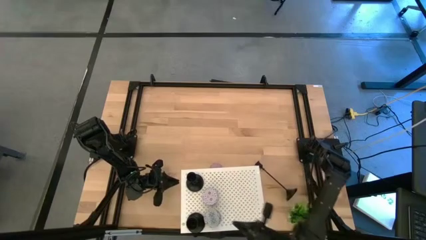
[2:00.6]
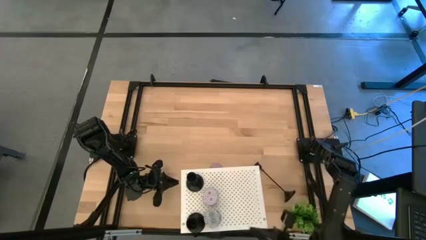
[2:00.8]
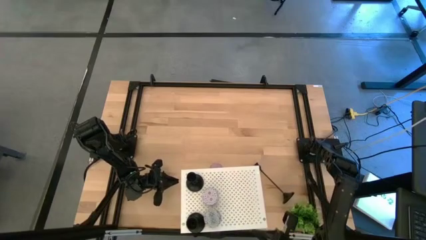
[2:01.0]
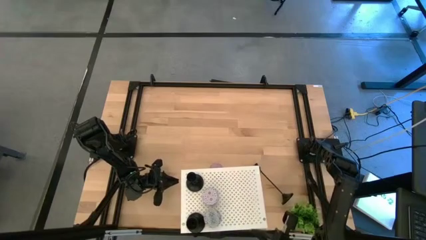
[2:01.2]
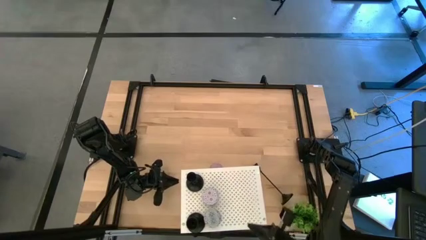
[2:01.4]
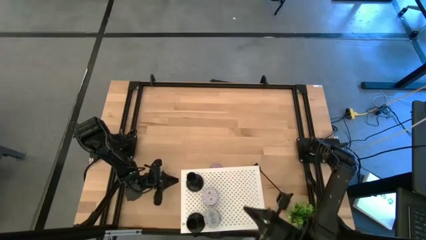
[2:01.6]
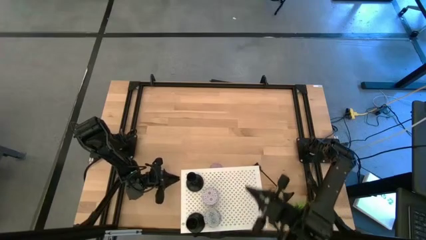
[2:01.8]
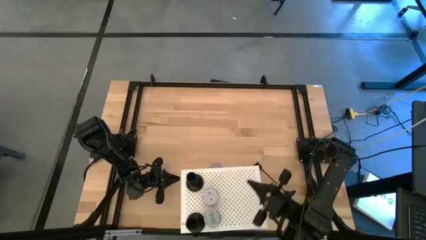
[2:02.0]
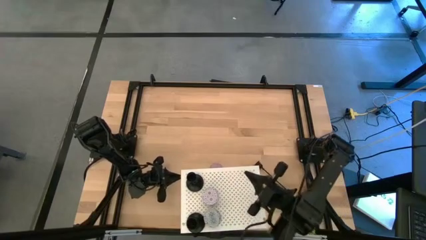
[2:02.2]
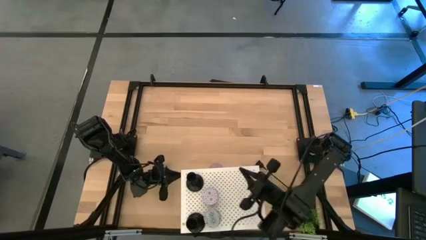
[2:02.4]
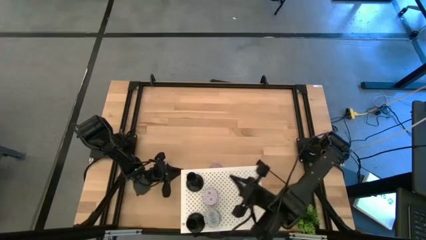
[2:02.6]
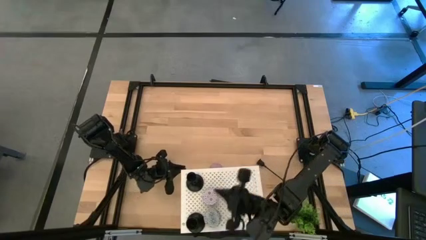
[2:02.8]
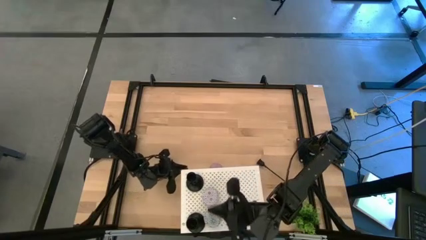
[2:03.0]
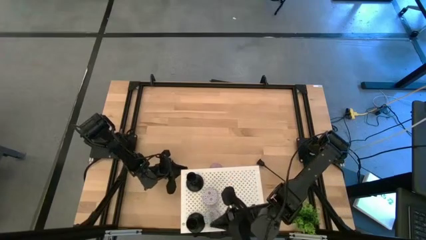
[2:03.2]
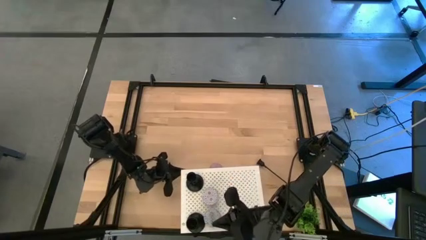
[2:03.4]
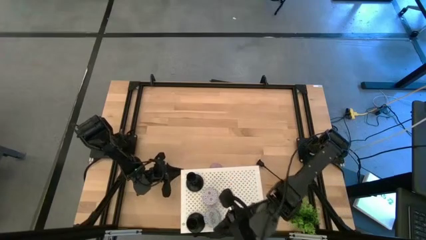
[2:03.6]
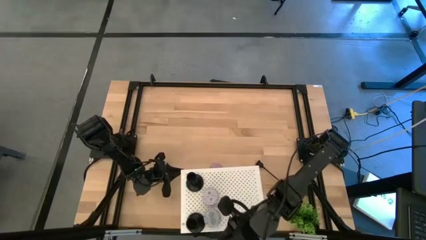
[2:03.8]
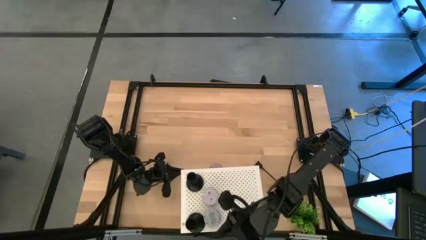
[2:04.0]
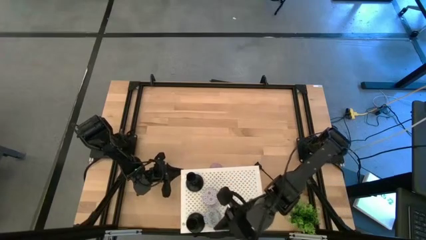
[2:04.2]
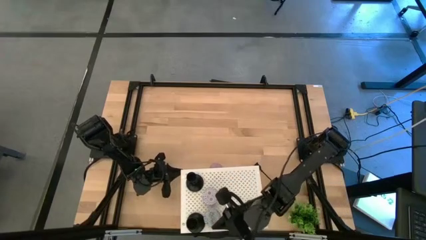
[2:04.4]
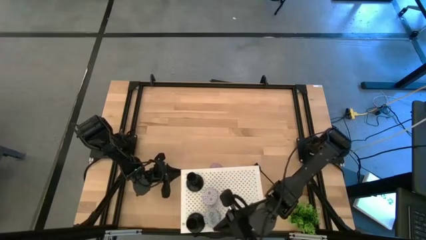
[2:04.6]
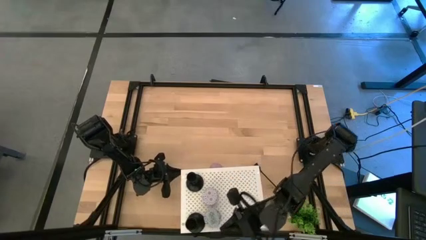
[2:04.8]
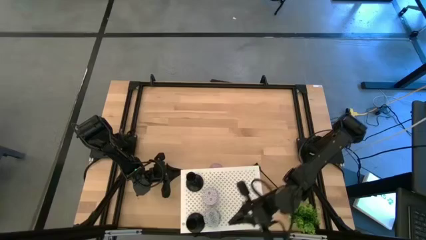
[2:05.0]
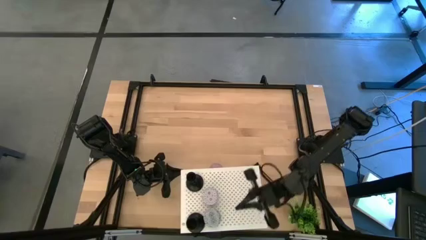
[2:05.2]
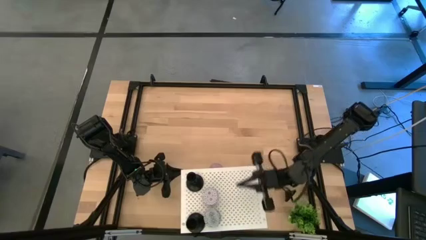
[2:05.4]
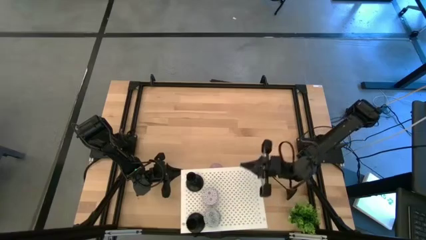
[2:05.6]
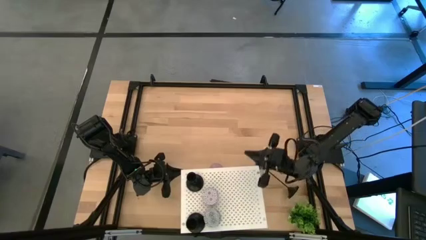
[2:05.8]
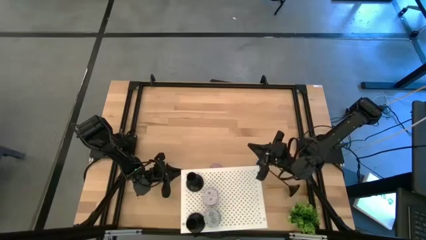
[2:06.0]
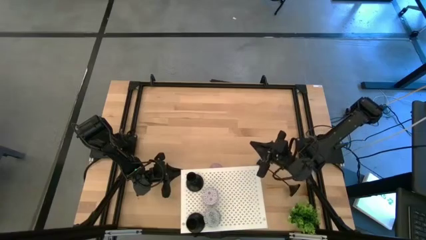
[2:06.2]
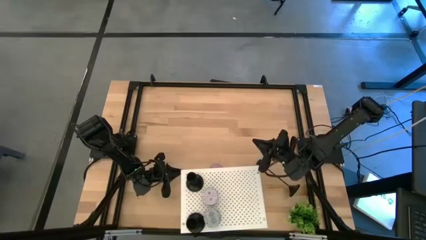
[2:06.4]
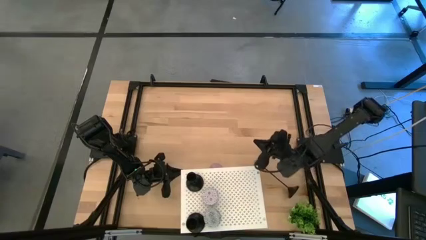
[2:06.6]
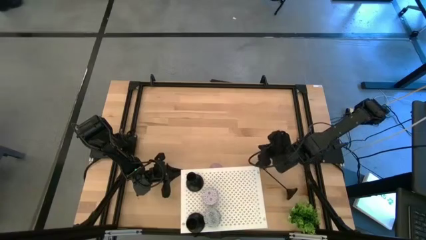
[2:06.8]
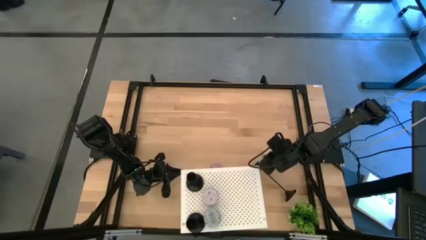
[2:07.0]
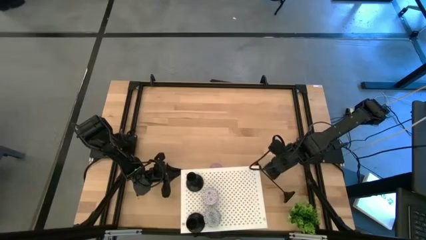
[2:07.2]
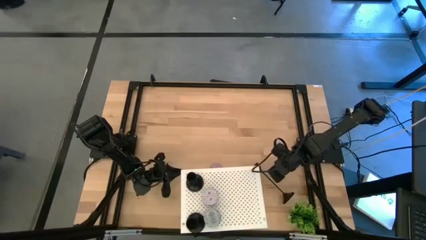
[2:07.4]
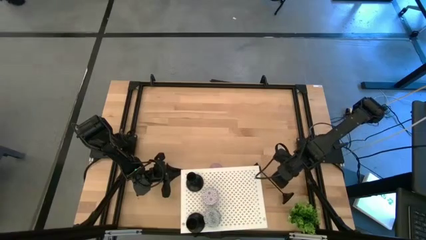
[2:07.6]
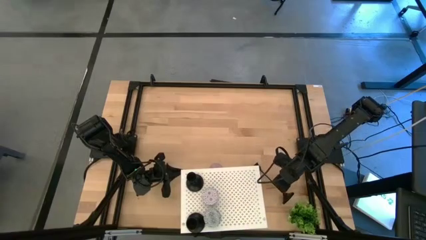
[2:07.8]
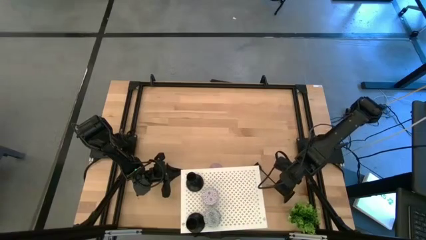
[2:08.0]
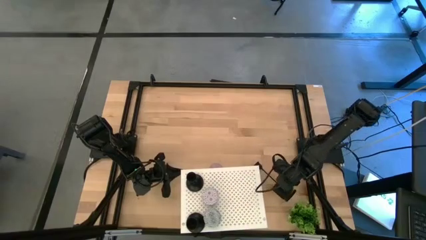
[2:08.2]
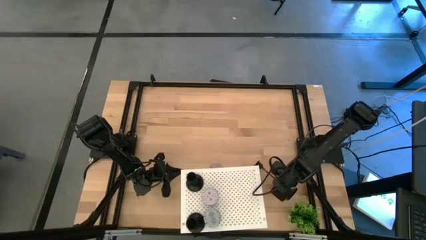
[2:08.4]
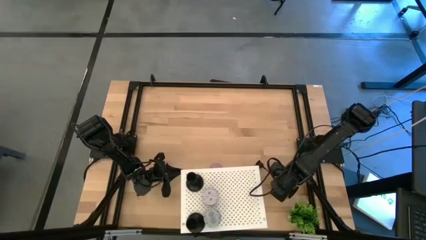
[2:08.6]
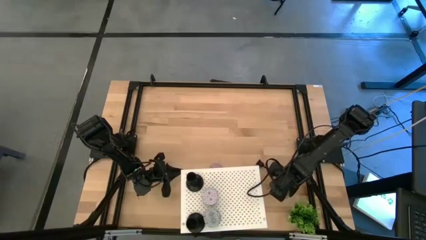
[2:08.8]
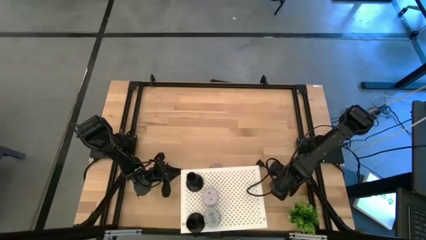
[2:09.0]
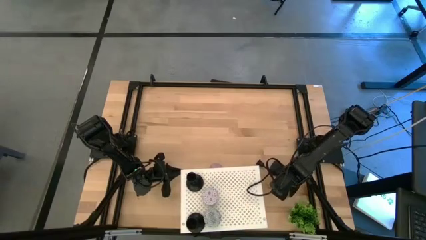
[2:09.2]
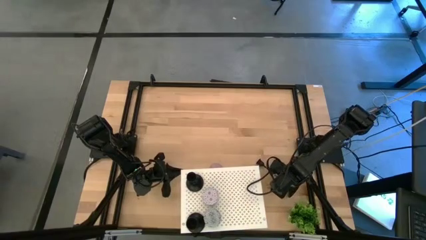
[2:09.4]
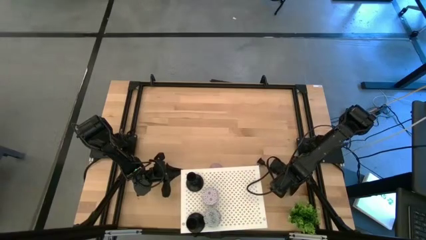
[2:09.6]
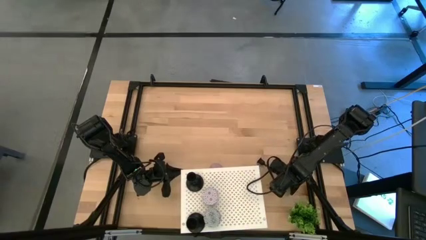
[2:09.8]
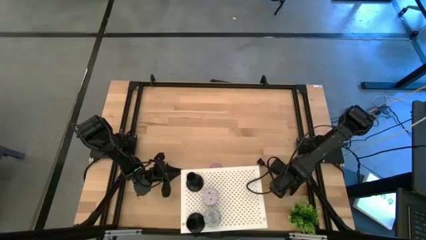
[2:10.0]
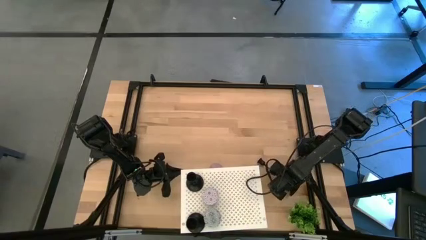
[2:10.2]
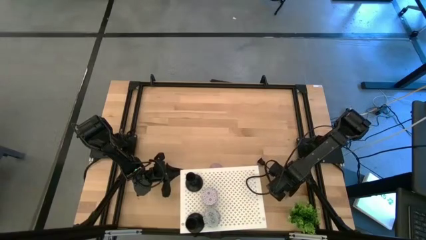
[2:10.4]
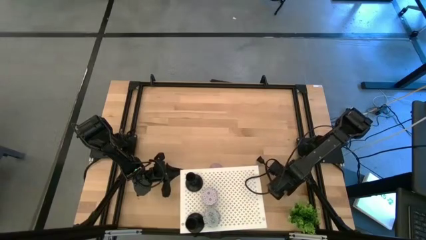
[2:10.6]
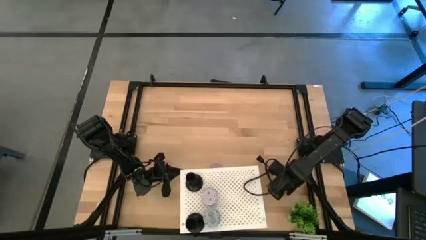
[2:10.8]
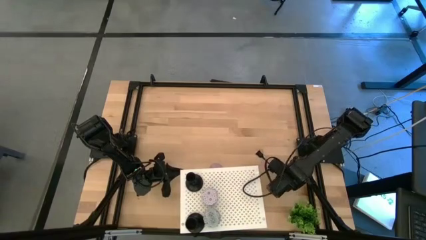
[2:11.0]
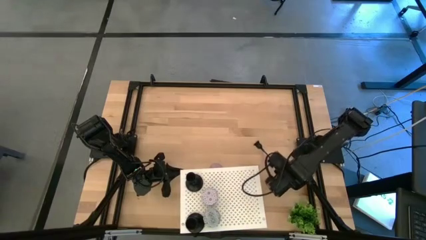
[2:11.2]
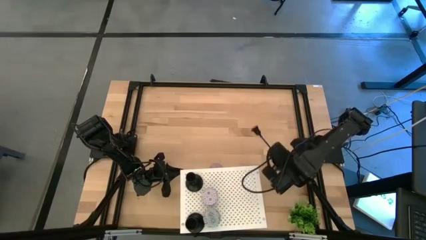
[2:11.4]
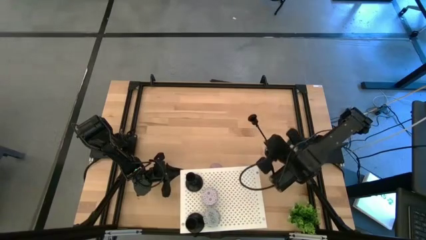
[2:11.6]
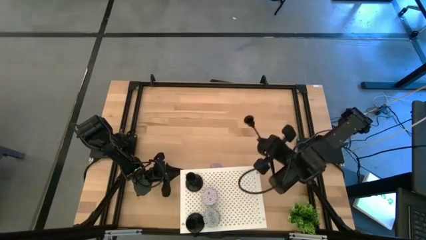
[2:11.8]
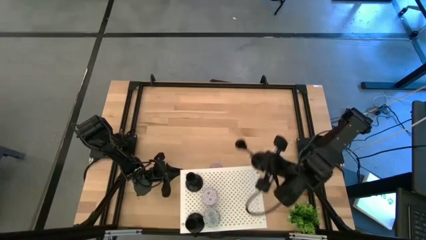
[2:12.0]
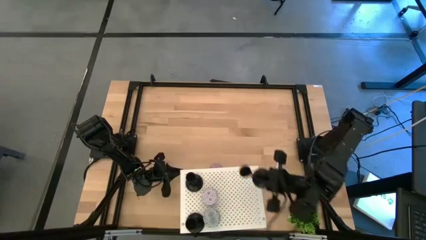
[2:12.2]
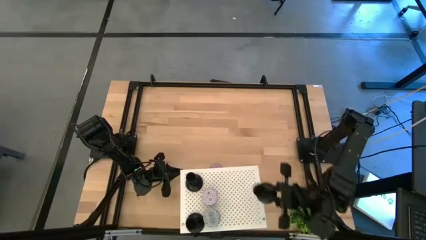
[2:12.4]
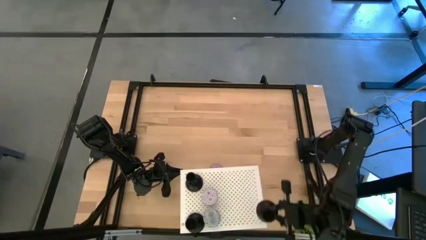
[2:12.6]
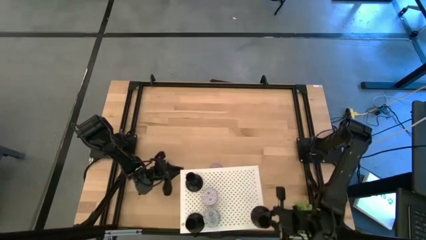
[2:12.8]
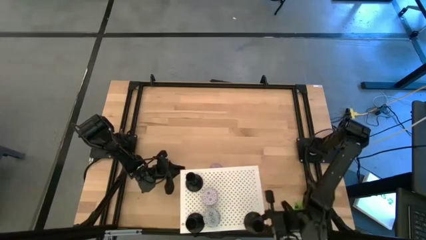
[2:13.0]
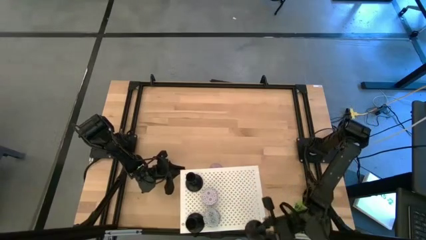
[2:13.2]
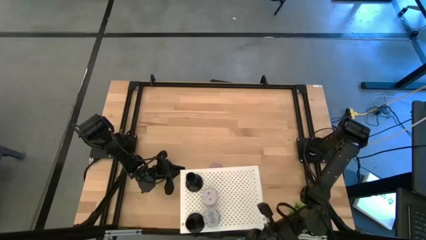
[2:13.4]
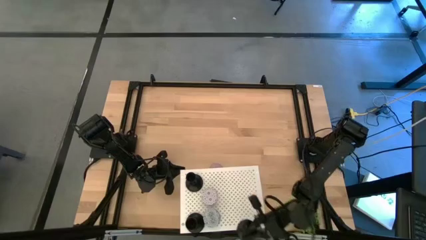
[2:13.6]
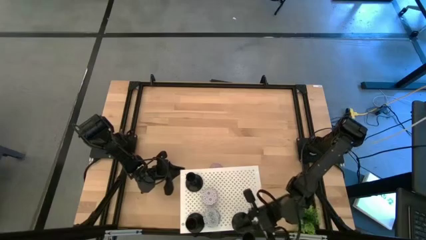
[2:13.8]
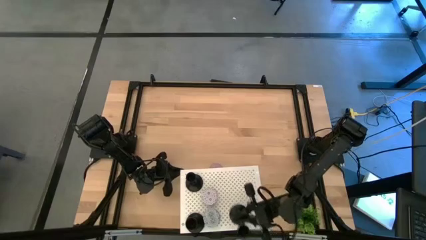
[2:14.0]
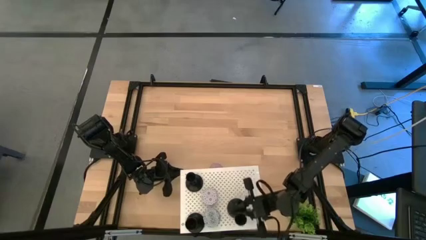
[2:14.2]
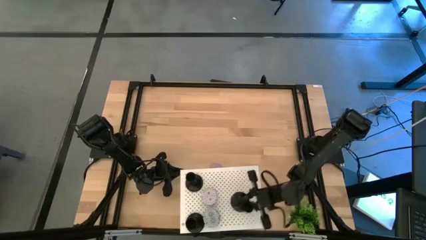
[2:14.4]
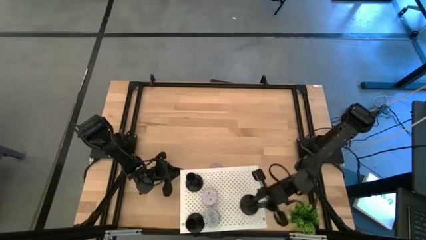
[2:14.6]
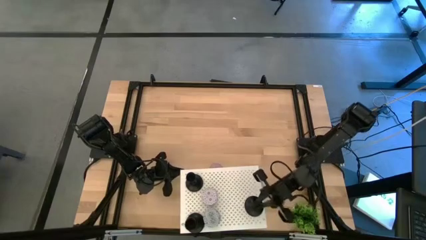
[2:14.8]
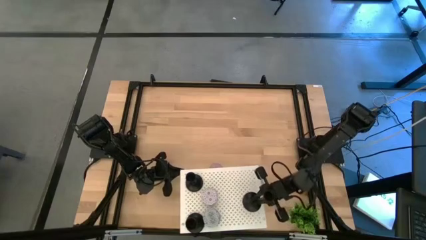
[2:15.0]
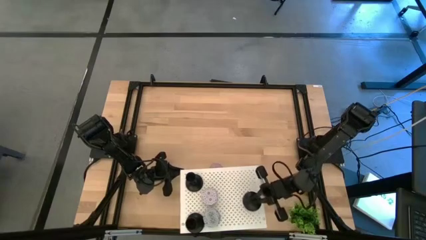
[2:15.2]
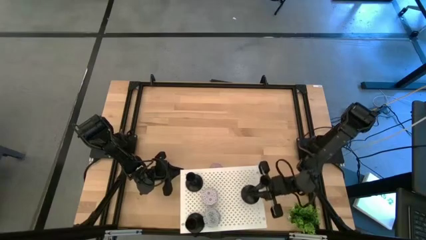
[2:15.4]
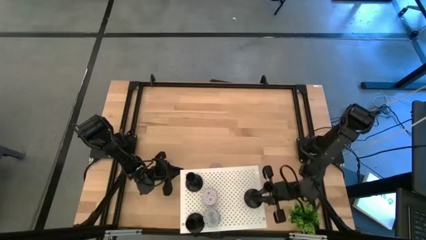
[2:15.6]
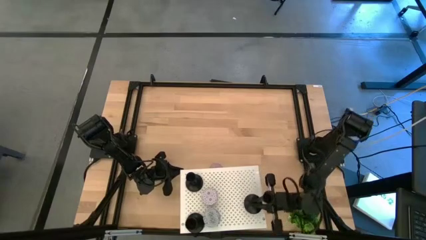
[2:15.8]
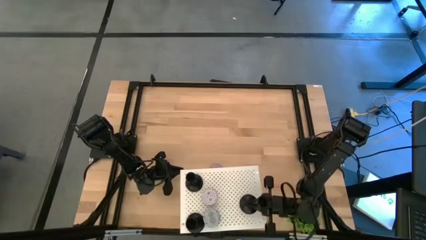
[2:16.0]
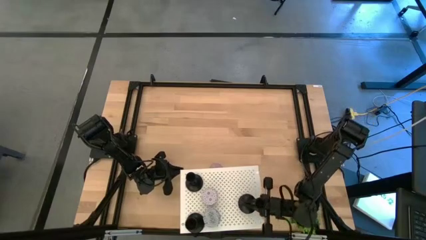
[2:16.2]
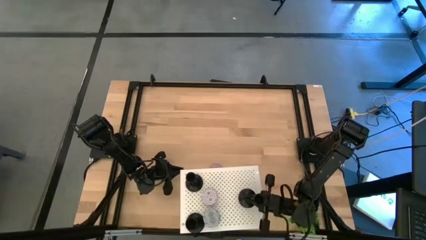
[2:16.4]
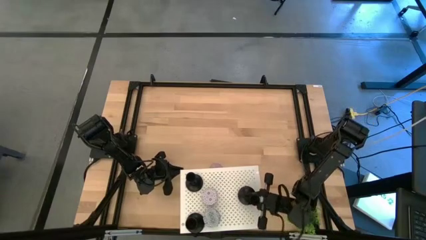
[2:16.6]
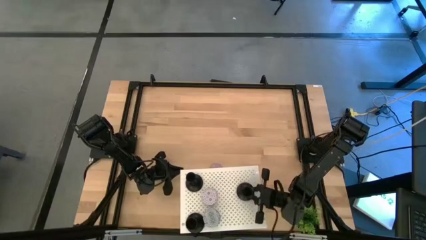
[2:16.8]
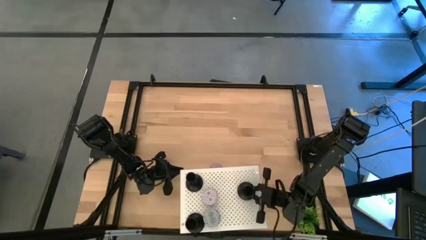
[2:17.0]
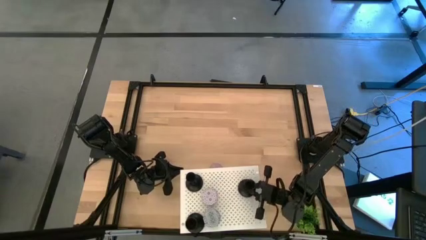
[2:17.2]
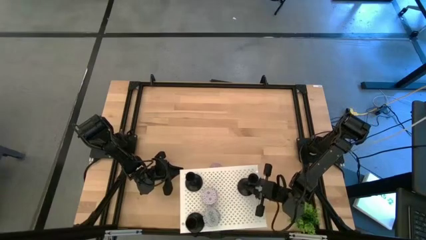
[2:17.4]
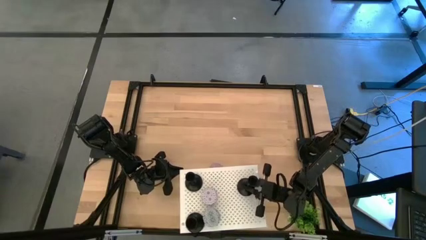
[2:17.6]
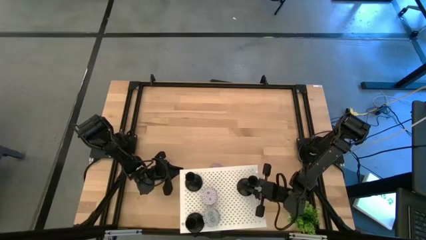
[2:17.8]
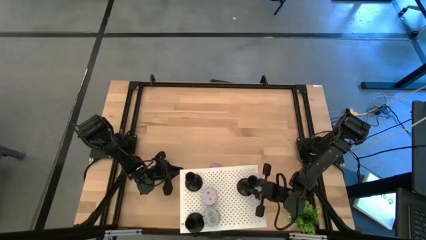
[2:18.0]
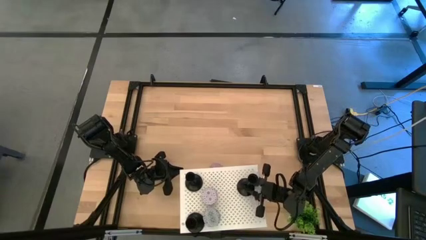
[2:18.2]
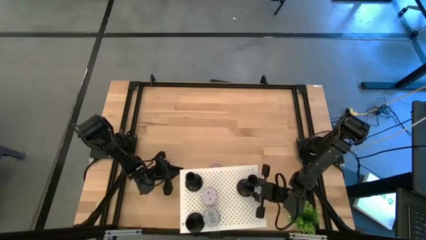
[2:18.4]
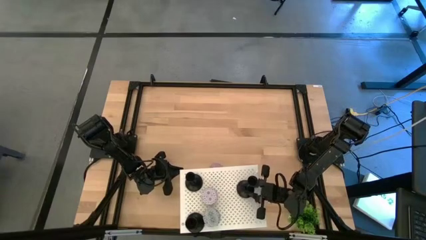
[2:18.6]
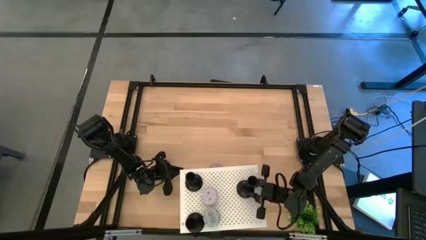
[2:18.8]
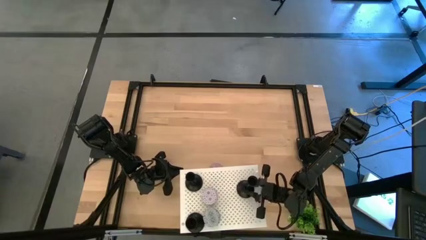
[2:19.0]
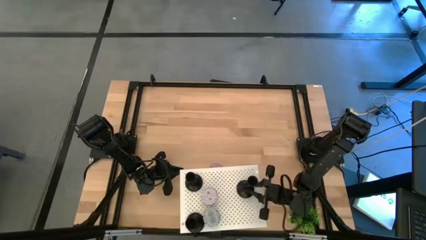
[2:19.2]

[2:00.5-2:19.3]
Task: Pick & Place candle stick holders
Put the black candle holder on the shelf
